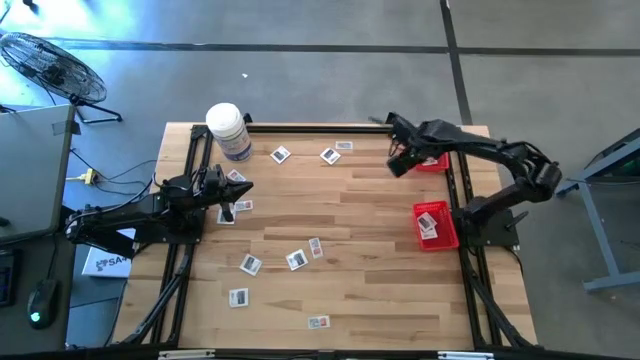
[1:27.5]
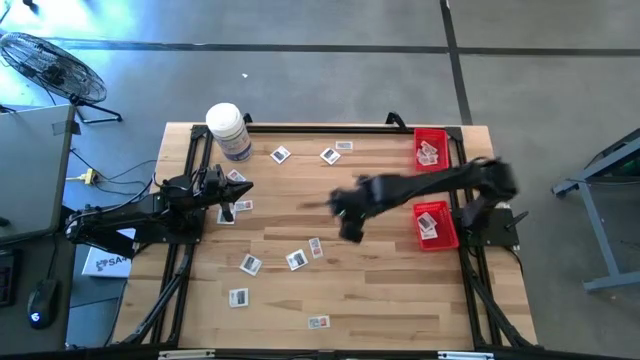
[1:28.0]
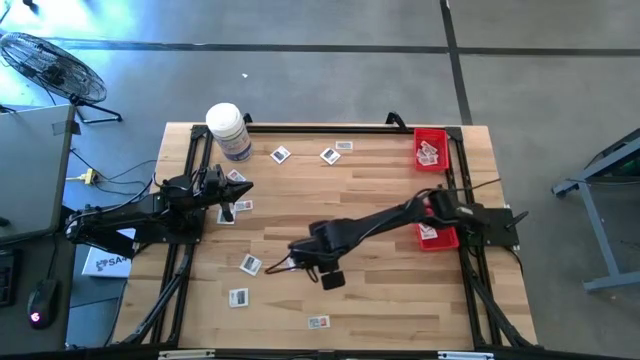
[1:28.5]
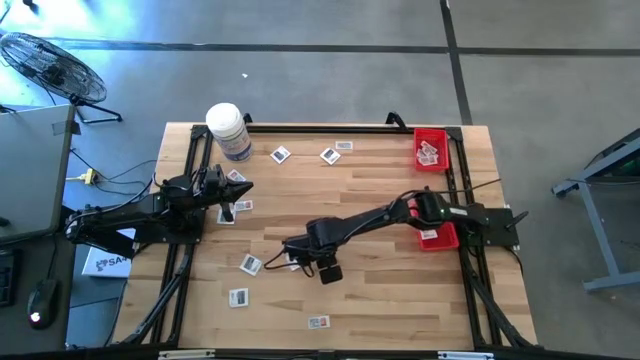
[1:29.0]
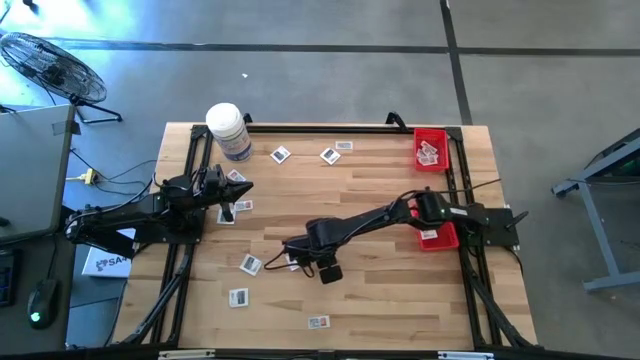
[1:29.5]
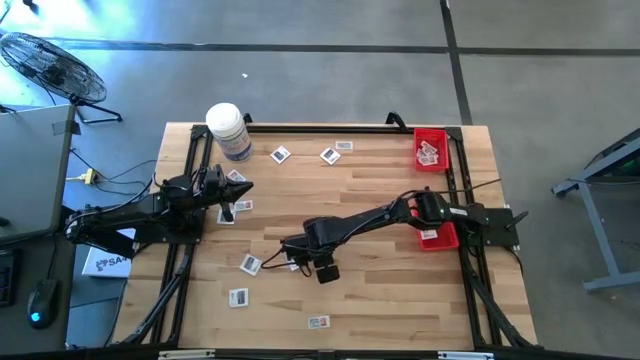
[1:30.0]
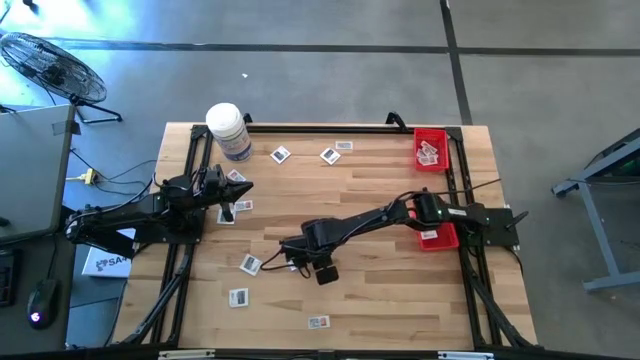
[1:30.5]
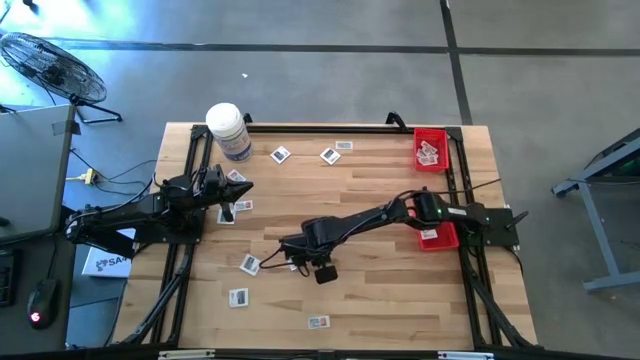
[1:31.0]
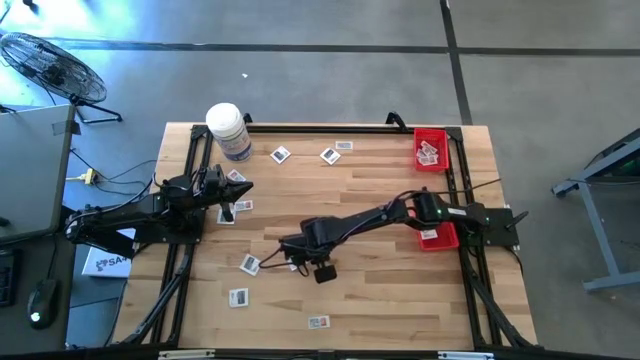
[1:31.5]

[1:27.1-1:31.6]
Task: Pick & Place First Aid Supplies
Put the ointment pack into the top basket

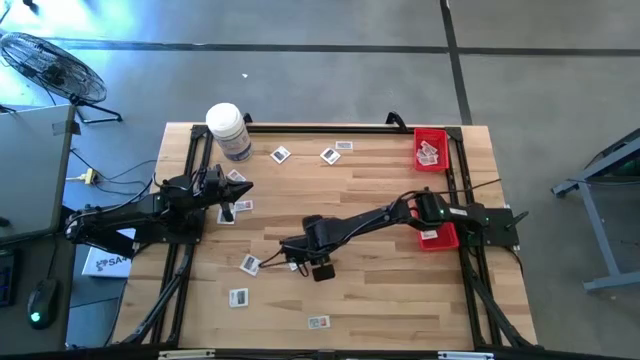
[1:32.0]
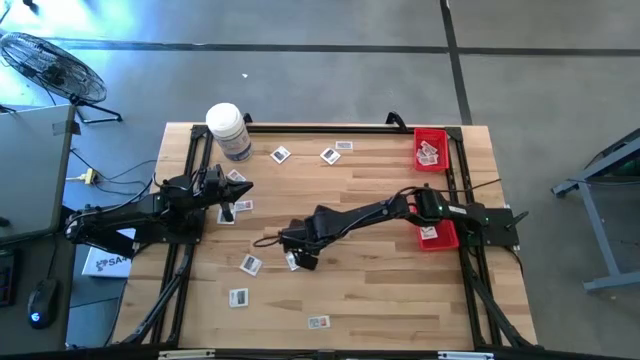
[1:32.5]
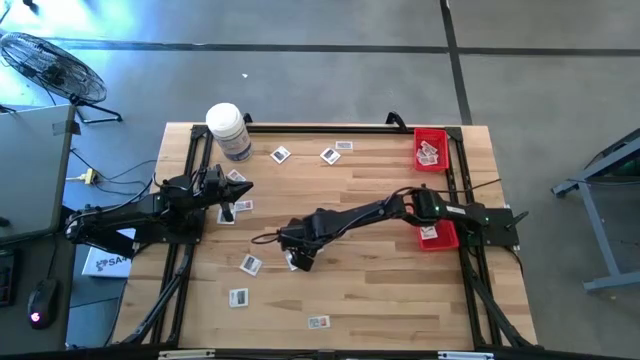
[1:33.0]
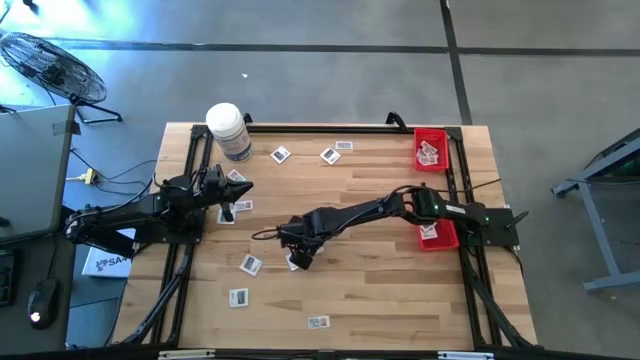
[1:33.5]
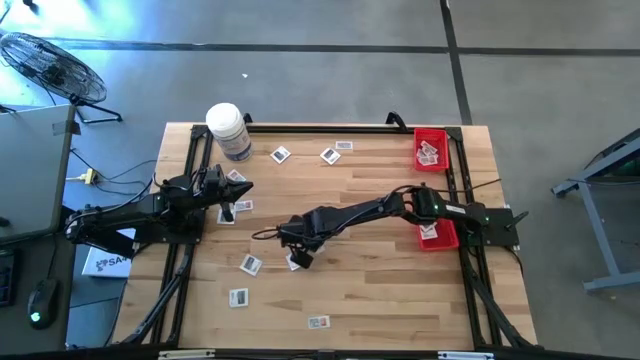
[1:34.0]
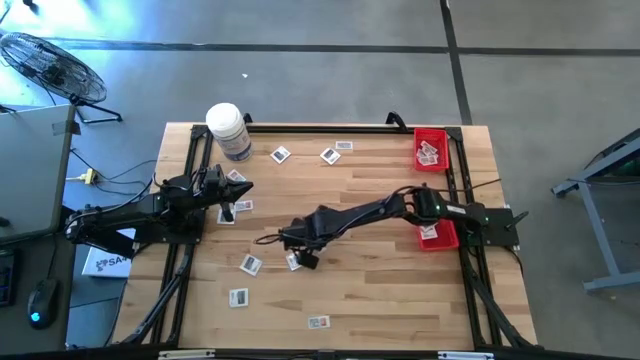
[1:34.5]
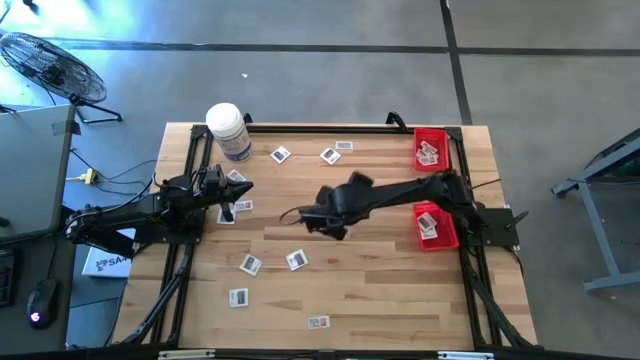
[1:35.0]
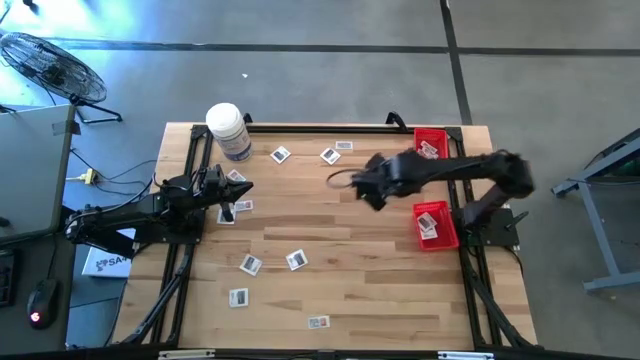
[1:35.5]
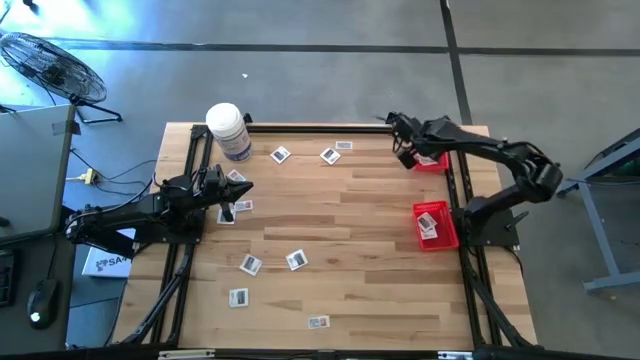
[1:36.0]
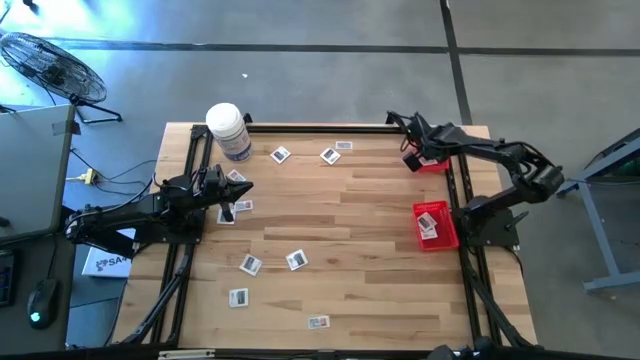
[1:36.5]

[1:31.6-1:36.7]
Put the ointment pack into the top basket

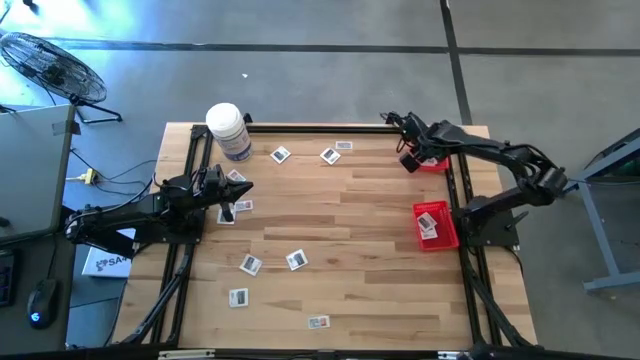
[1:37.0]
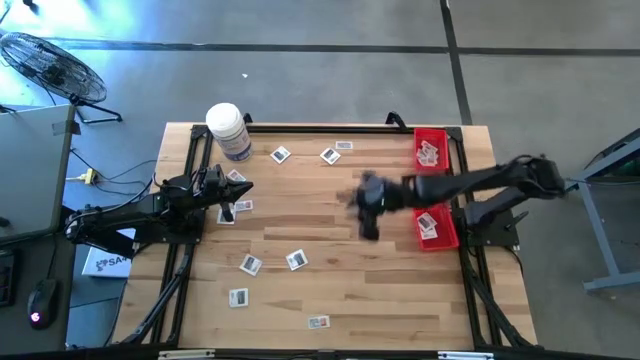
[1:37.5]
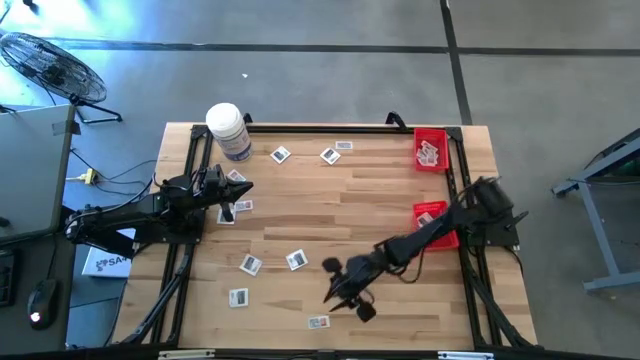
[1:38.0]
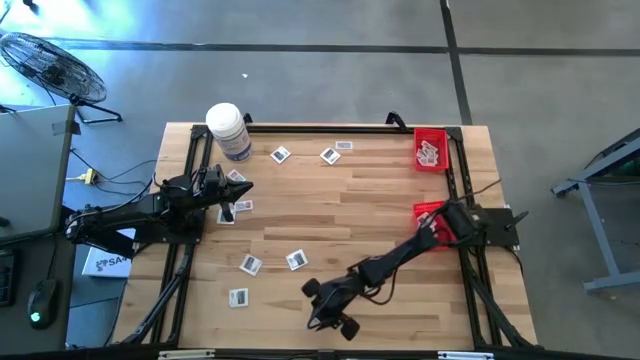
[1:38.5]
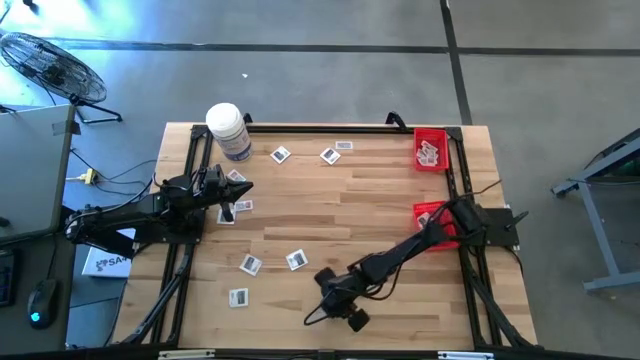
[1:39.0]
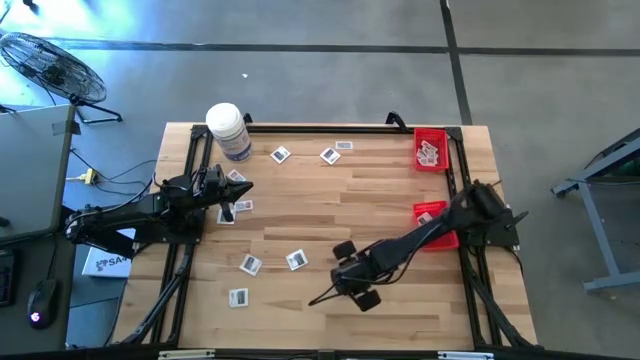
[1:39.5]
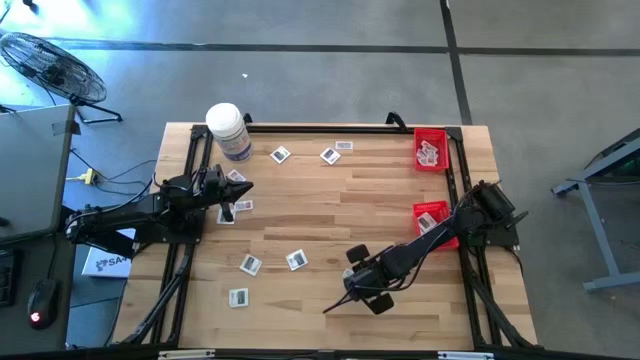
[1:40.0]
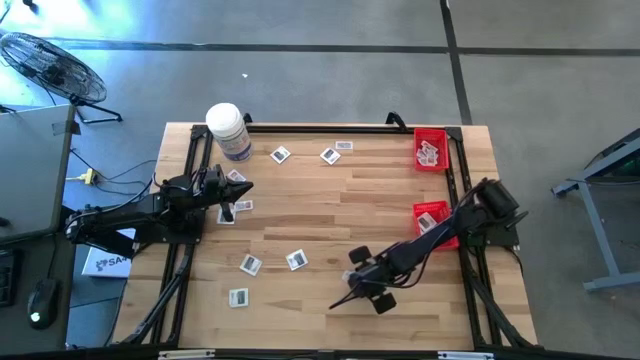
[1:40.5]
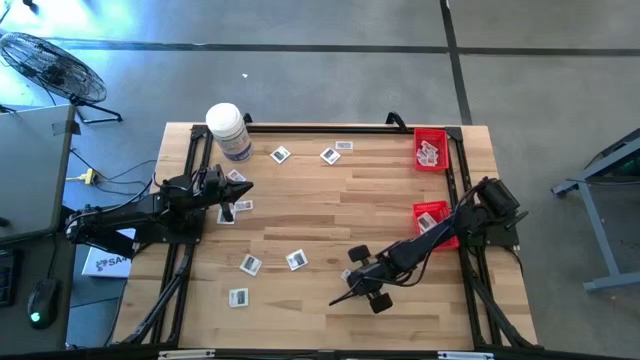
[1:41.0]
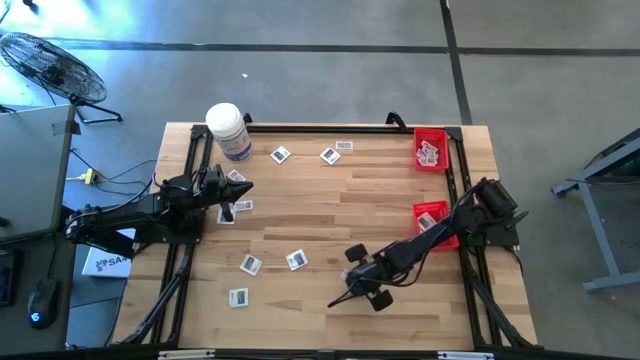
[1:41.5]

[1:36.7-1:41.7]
Put the ointment pack into the top basket

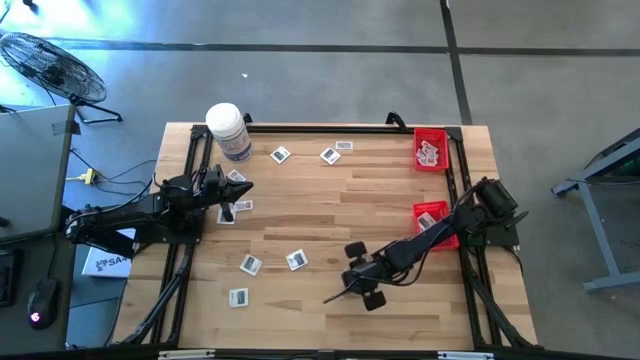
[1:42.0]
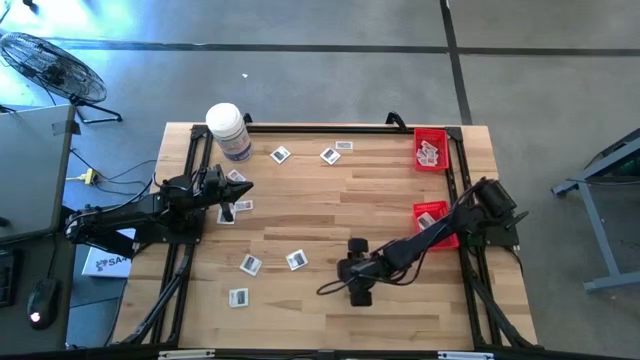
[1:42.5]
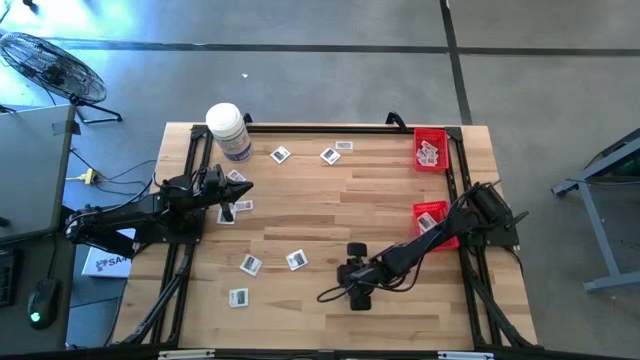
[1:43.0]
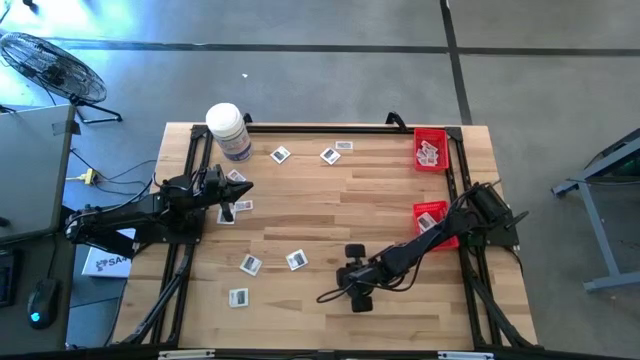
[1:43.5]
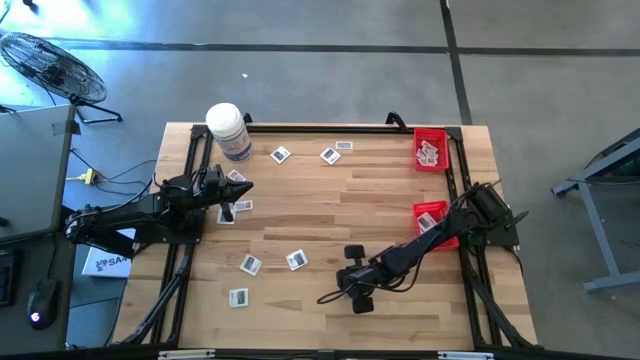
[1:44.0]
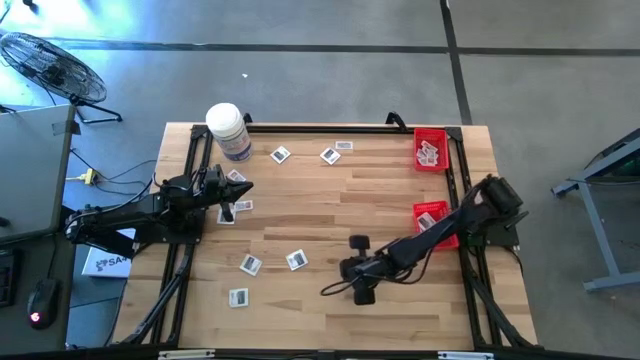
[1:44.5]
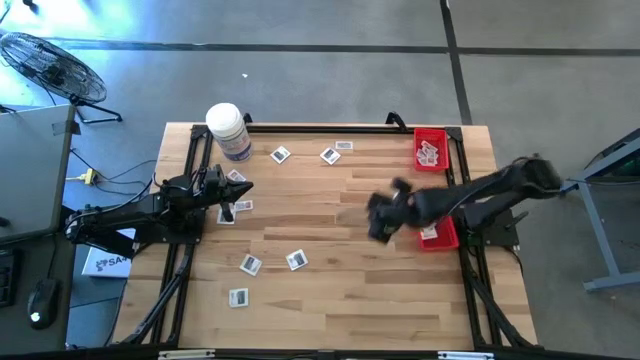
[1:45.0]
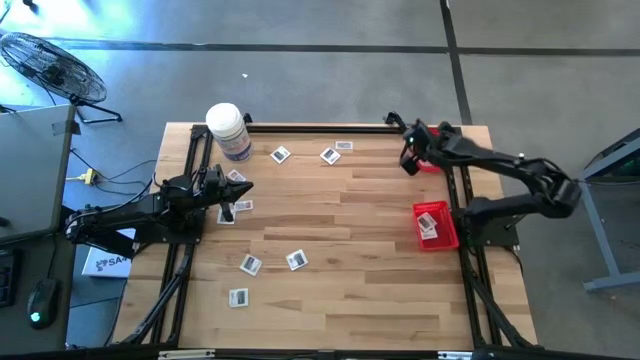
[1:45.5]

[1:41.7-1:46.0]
Put the ointment pack into the top basket

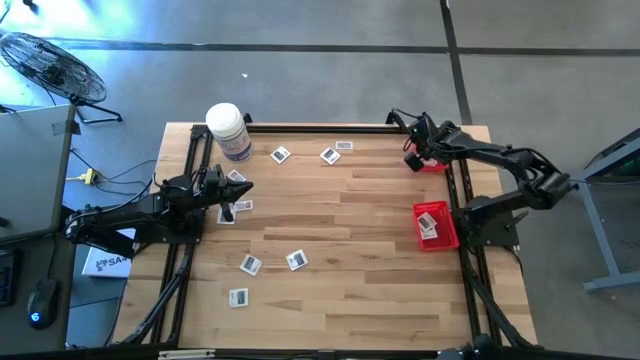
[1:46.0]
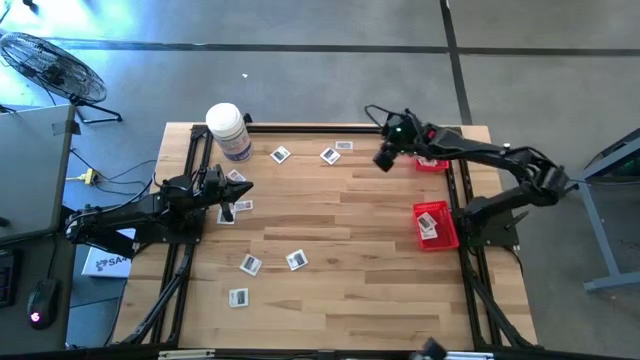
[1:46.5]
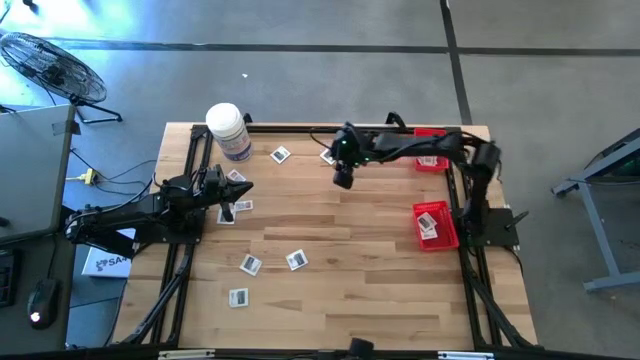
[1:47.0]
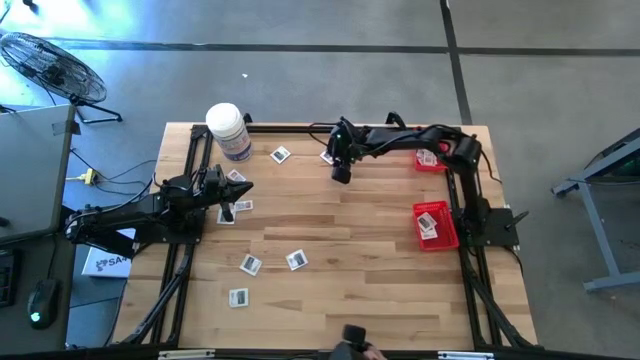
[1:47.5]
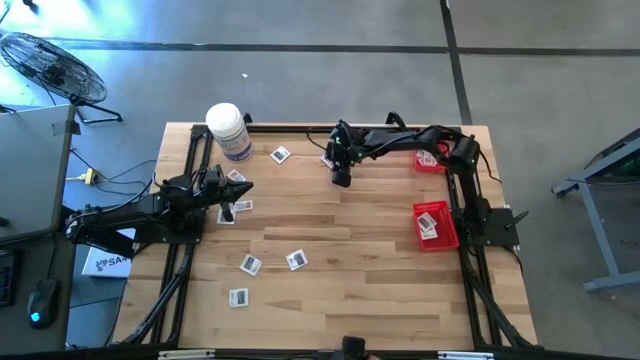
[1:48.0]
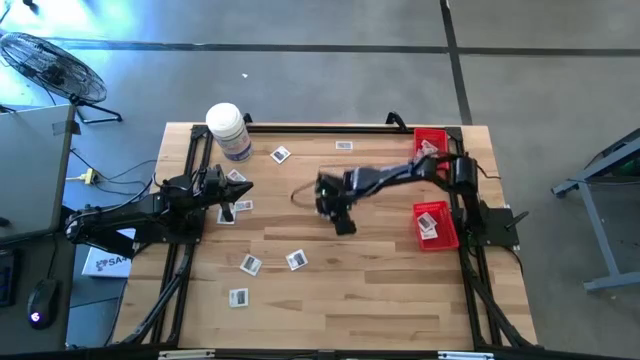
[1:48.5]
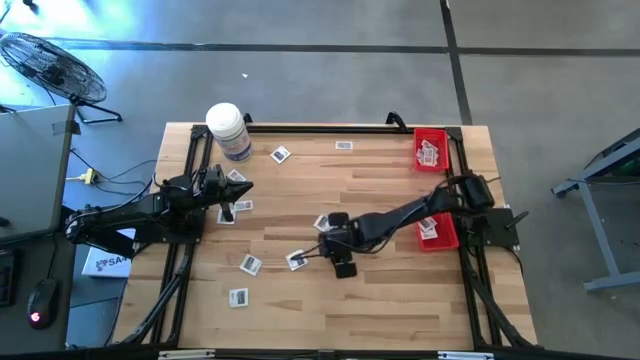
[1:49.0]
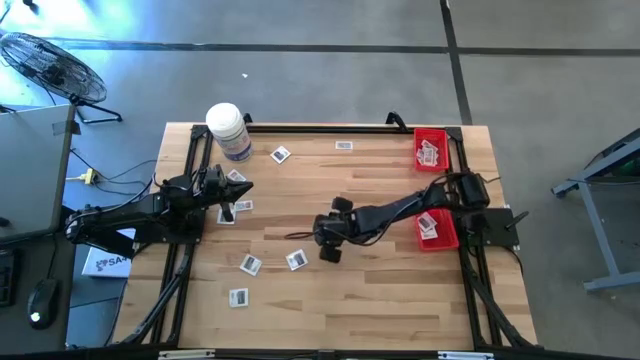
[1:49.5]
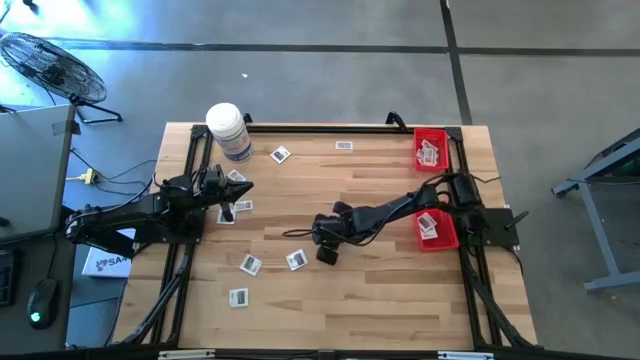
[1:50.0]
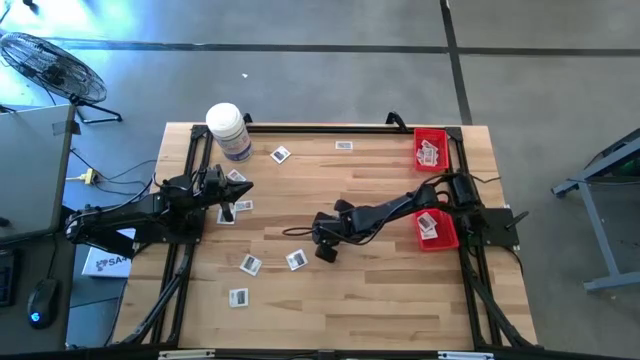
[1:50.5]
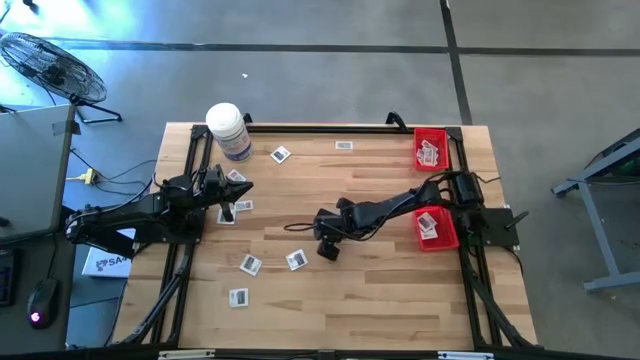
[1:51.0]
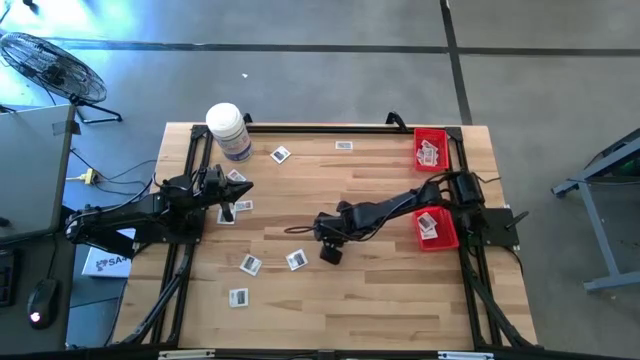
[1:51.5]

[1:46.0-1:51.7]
Put the towelette pack into the bottom basket
